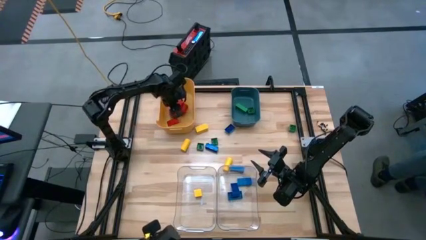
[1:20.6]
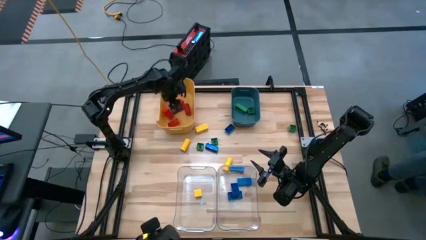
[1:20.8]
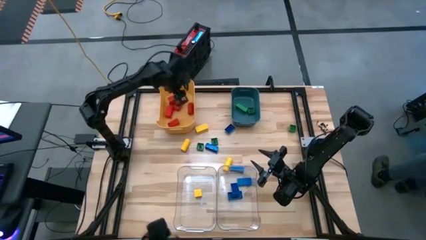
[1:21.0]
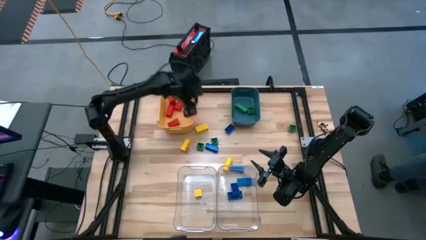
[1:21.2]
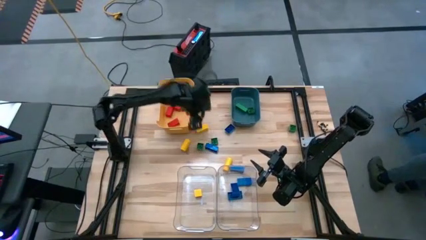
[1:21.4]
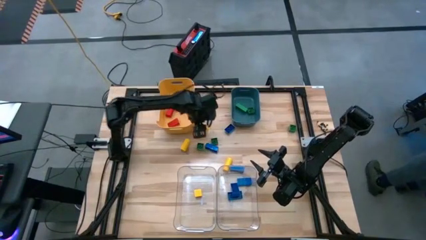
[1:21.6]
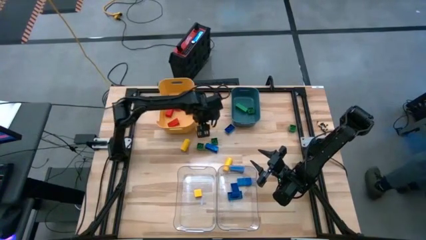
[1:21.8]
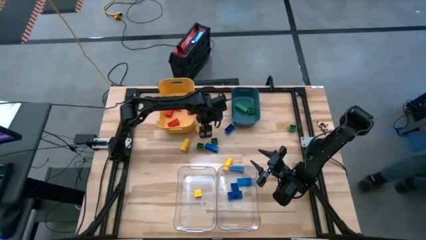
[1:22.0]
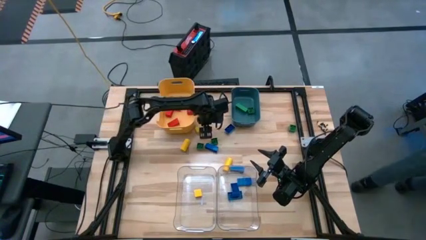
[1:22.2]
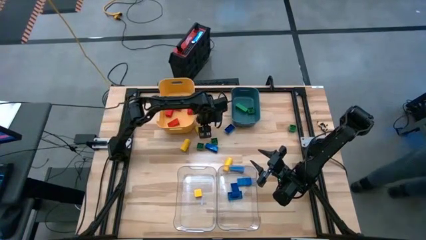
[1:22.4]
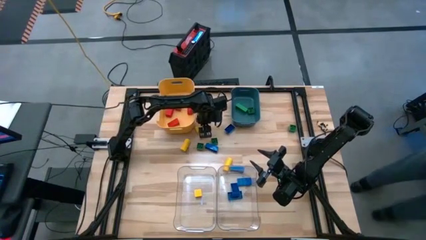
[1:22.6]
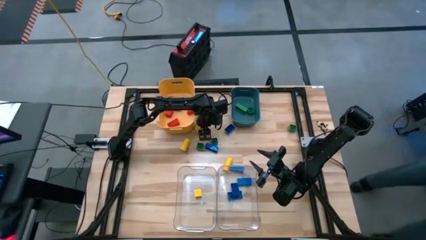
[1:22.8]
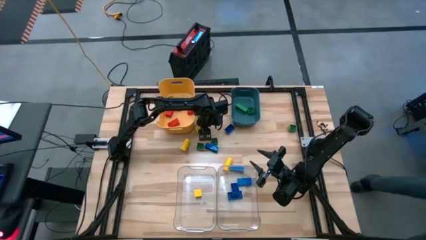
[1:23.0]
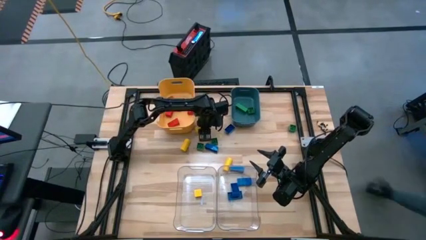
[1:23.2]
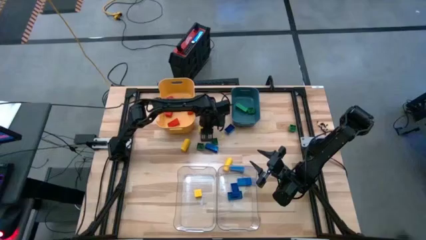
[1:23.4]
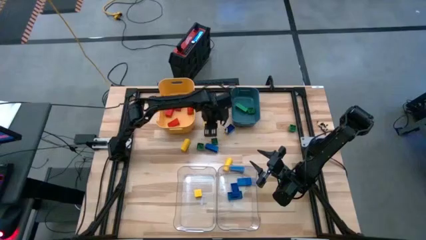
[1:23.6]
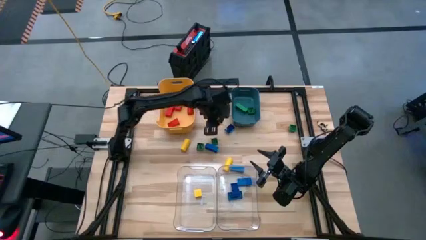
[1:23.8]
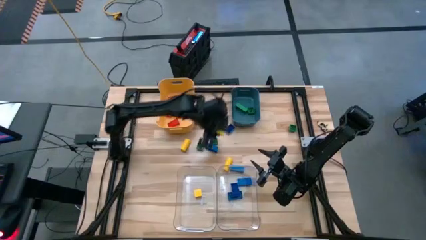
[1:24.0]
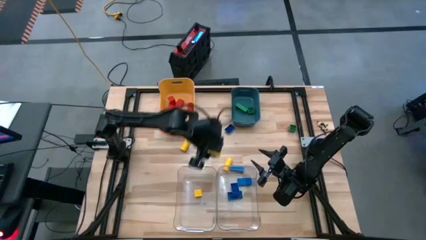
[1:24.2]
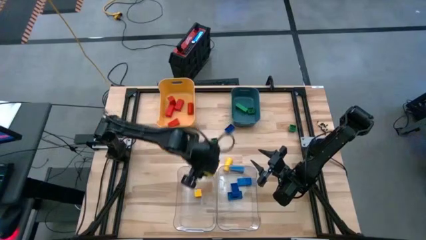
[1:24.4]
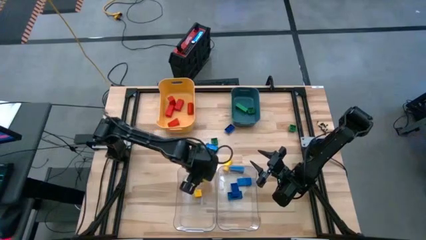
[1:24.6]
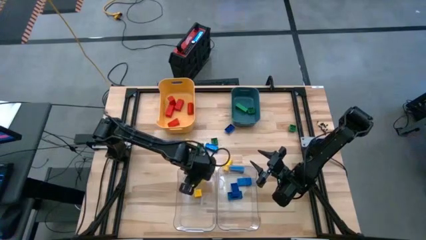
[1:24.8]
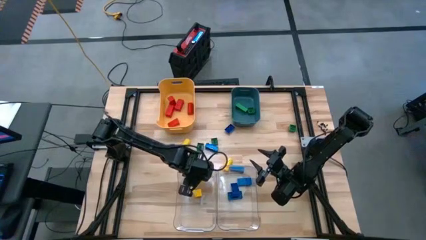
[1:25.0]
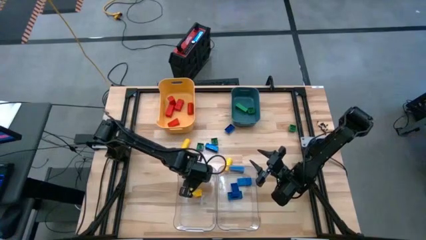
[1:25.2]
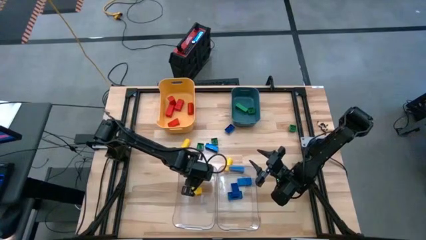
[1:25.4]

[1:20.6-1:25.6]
Task: Sort blocks
Put the yellow block into the left transparent bin

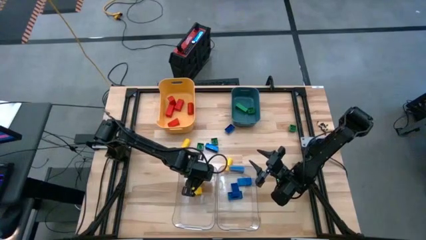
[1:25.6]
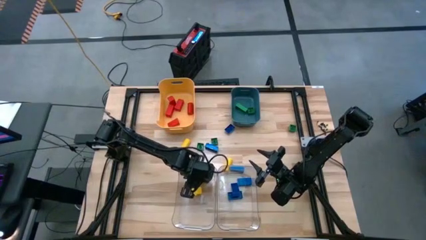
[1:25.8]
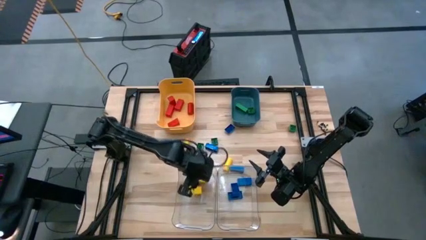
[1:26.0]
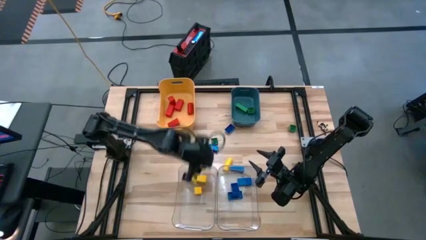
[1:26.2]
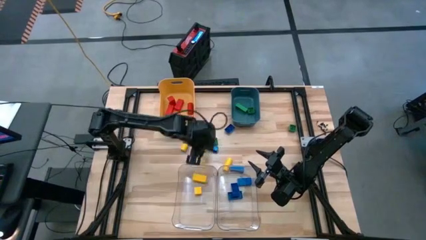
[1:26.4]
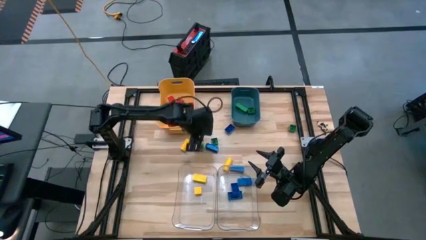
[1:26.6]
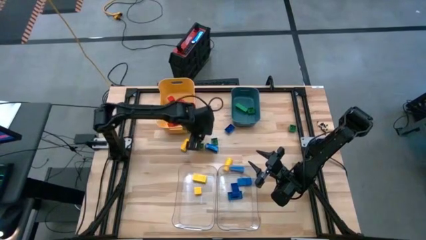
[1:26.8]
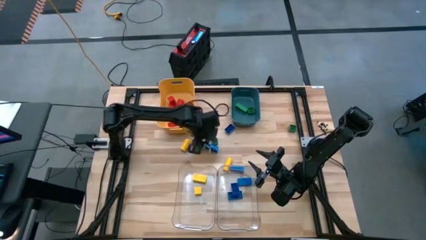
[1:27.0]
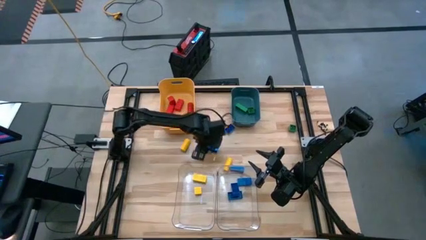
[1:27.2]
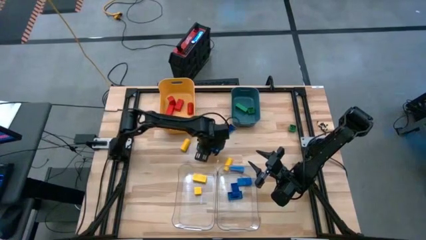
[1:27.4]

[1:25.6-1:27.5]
Put the blue game piece into the right transparent bin

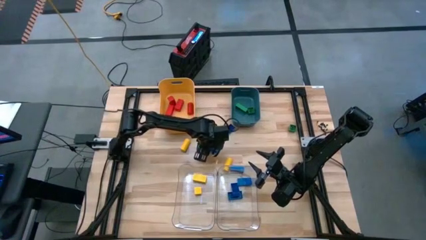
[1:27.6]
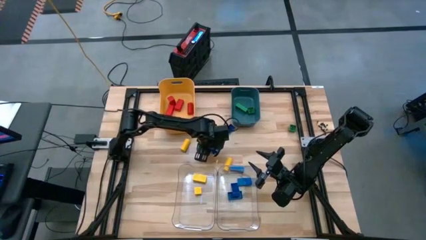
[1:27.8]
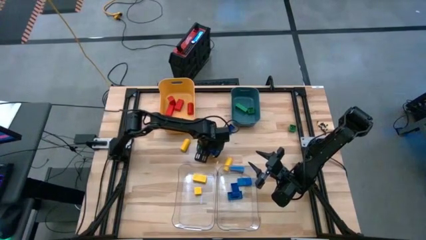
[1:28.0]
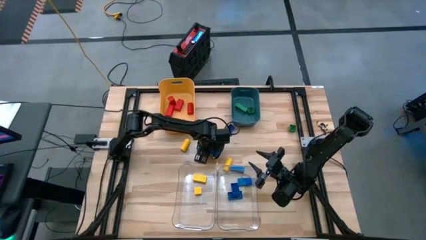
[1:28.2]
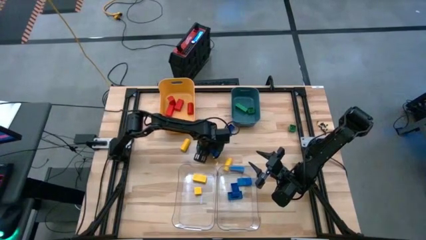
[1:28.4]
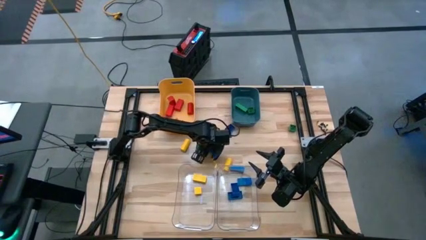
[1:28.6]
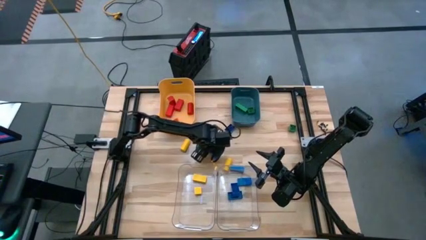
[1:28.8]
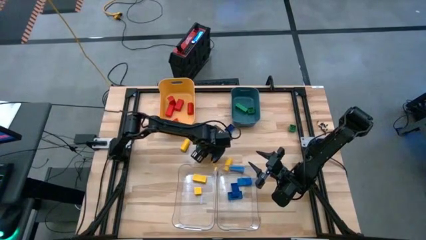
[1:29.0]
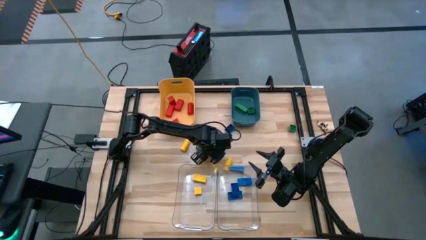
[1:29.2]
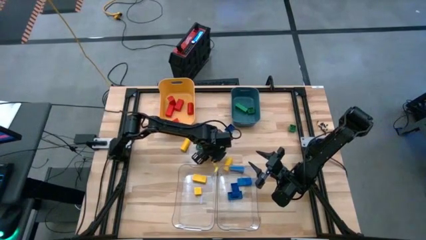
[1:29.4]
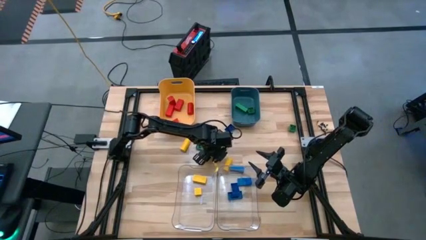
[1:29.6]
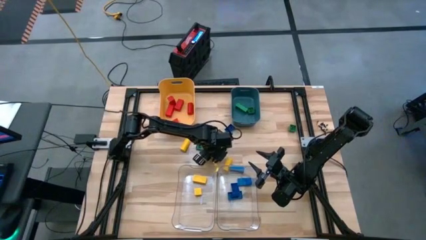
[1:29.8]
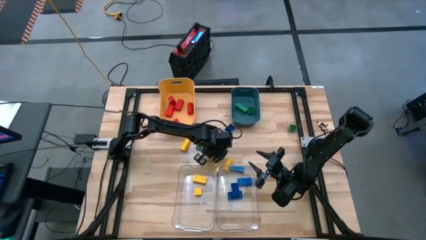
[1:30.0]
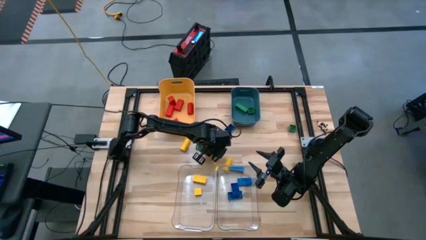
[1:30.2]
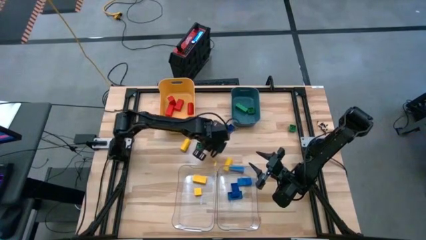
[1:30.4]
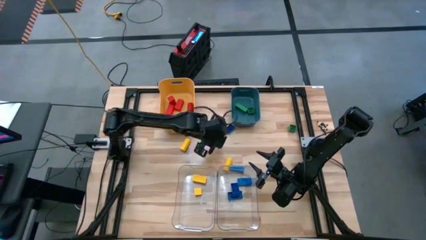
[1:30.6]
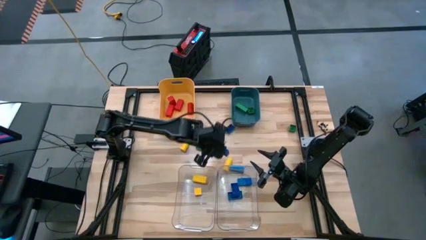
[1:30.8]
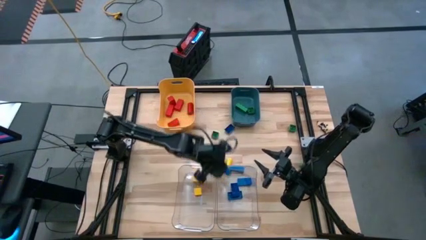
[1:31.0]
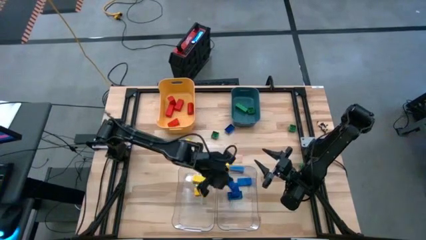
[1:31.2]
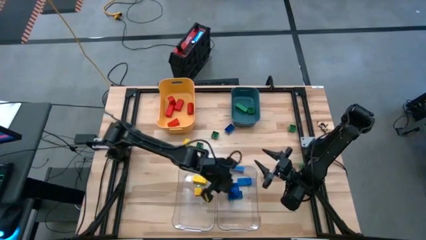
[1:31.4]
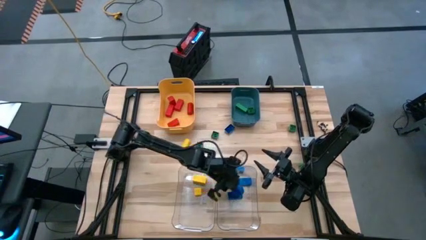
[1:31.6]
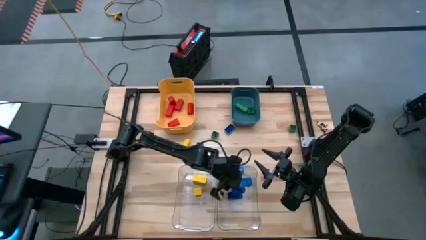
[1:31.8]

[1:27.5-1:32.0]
Put the blue game piece into the right transparent bin

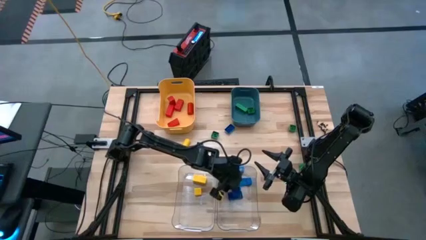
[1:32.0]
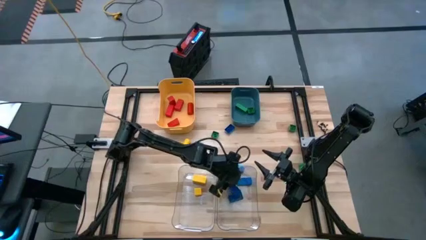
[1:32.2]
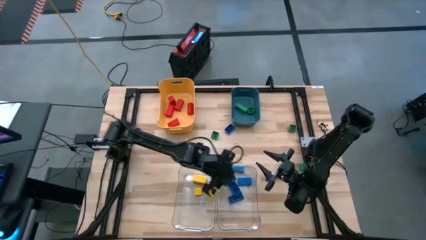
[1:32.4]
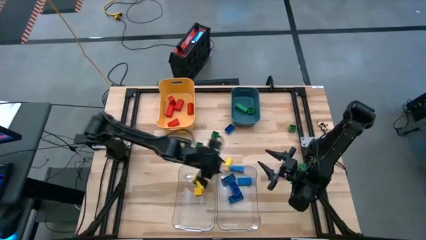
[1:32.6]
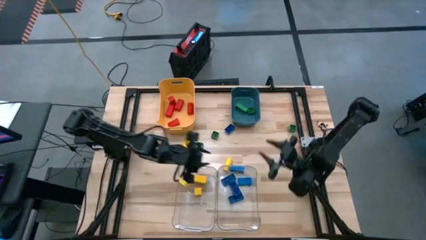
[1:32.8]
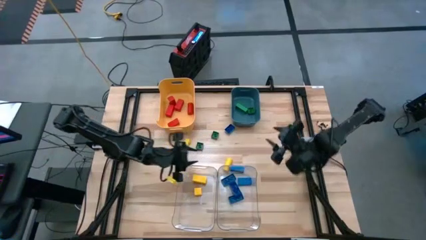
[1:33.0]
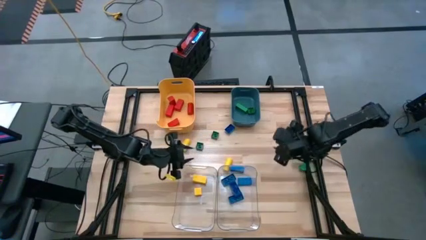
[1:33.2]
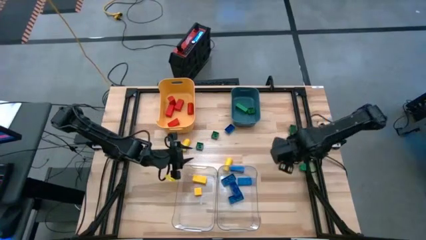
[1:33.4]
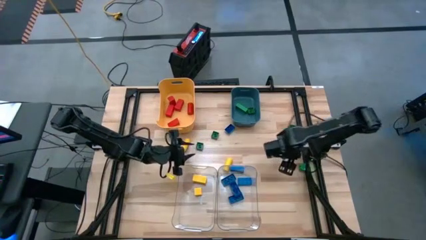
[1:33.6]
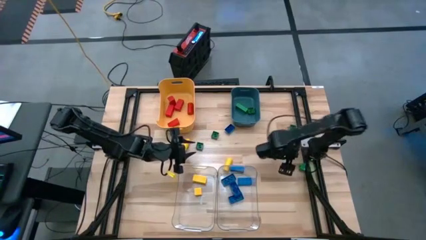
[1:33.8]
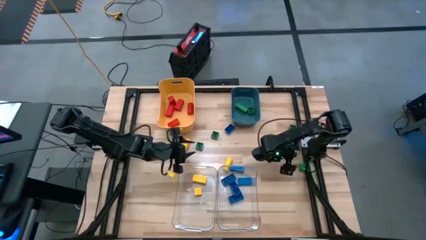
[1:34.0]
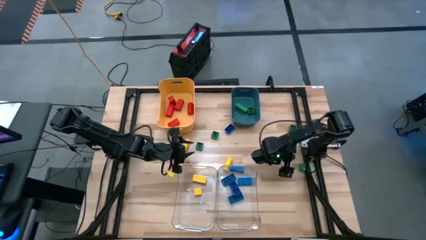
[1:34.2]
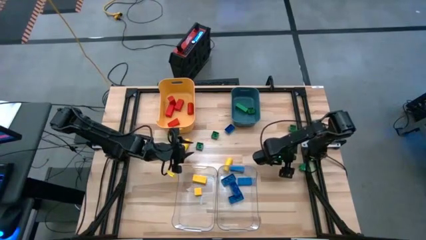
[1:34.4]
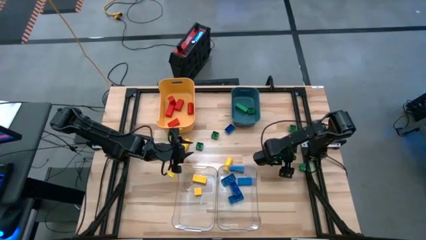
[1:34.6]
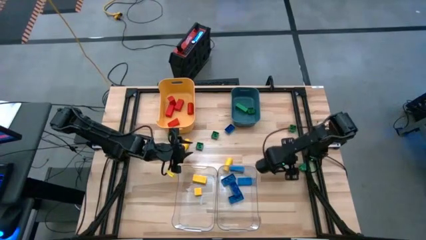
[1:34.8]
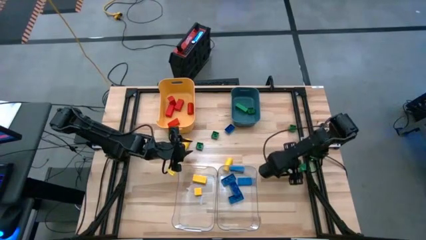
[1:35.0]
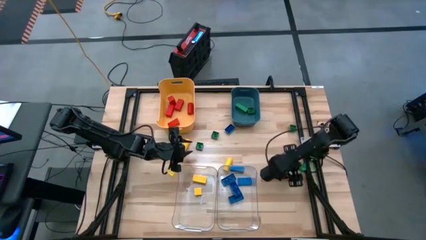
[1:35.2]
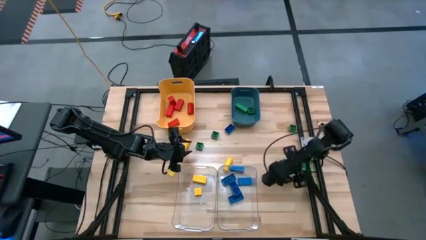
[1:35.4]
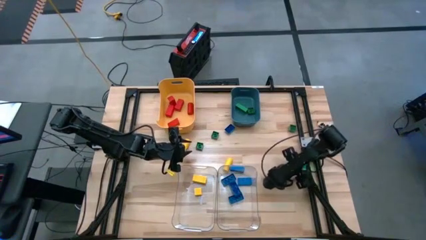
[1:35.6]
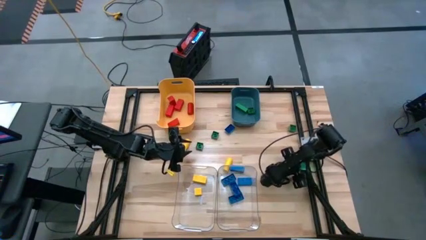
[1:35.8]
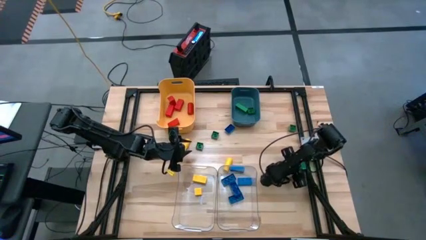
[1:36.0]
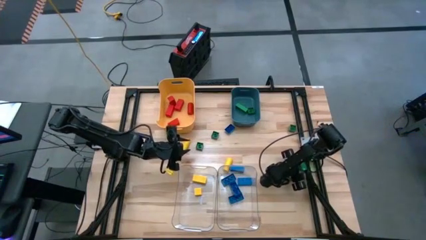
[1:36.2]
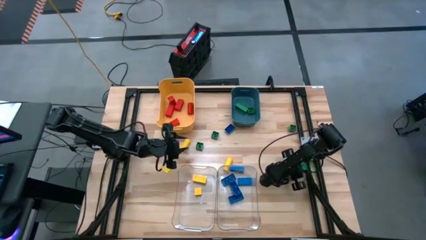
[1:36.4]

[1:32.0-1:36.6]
Put the green game piece into the blue bin
